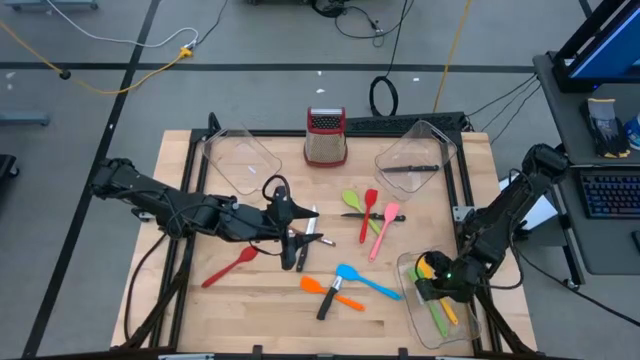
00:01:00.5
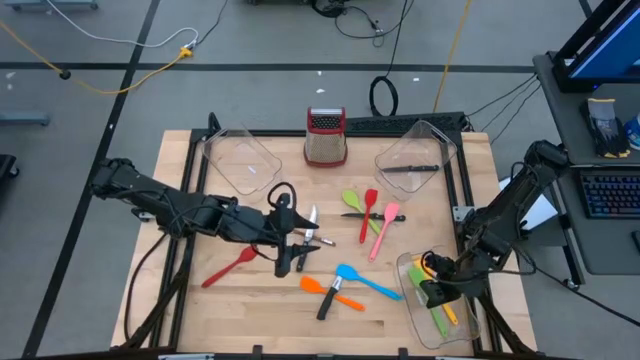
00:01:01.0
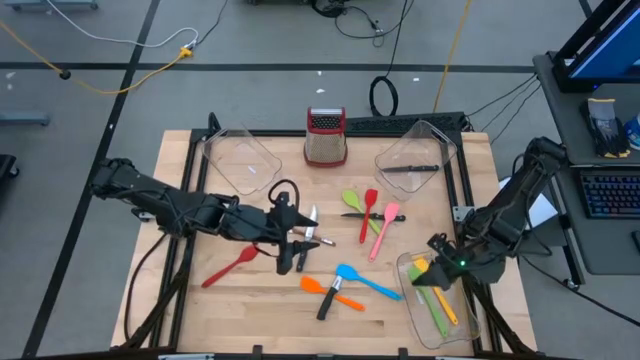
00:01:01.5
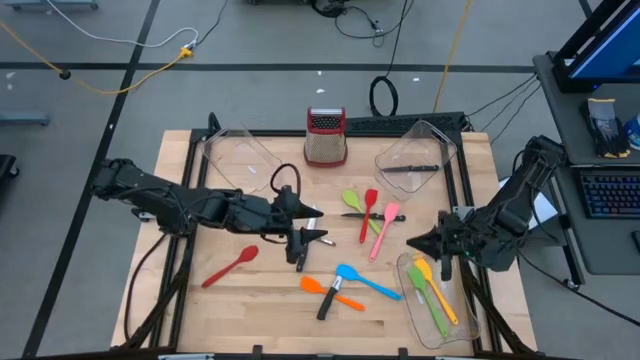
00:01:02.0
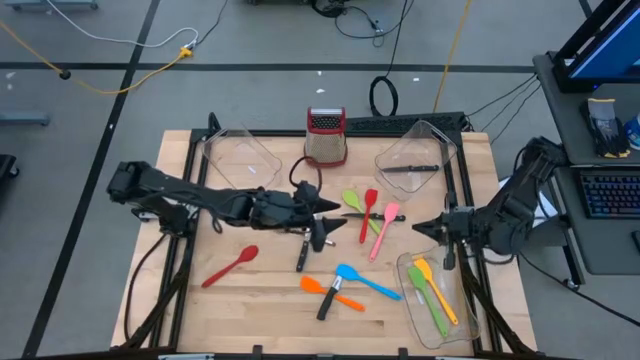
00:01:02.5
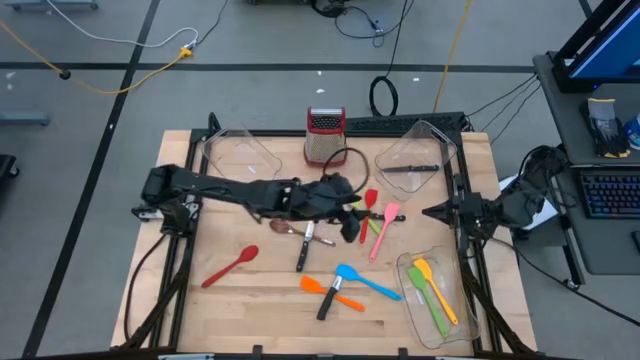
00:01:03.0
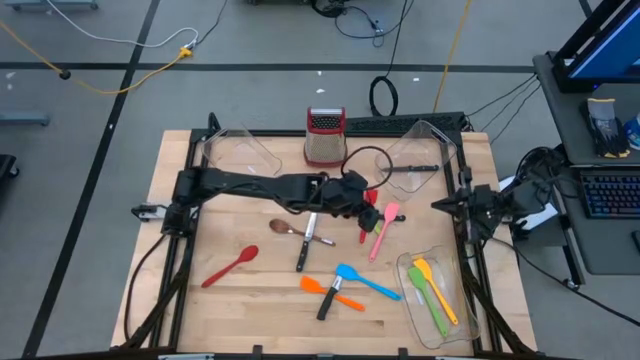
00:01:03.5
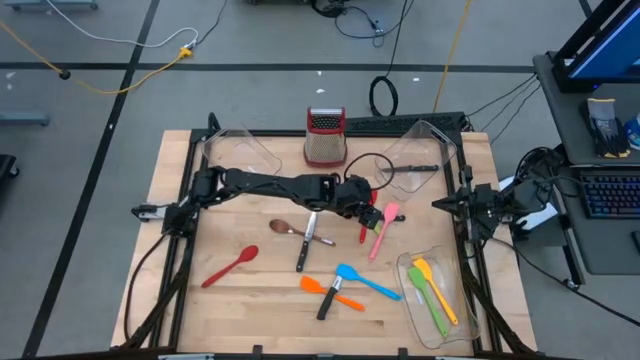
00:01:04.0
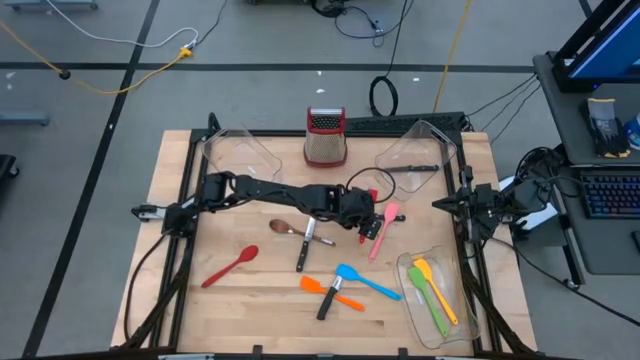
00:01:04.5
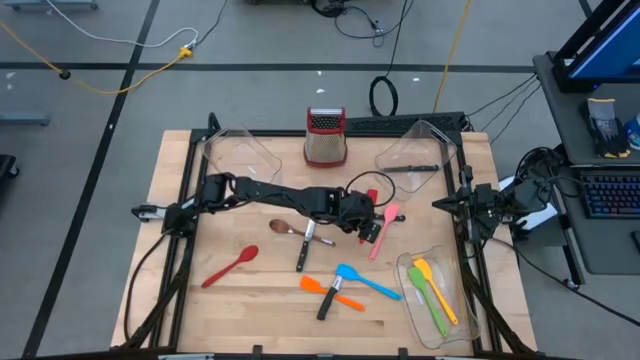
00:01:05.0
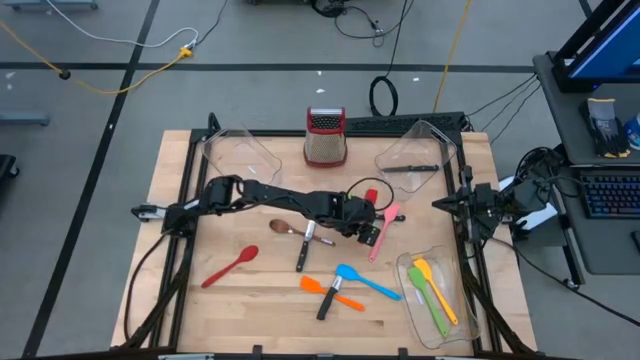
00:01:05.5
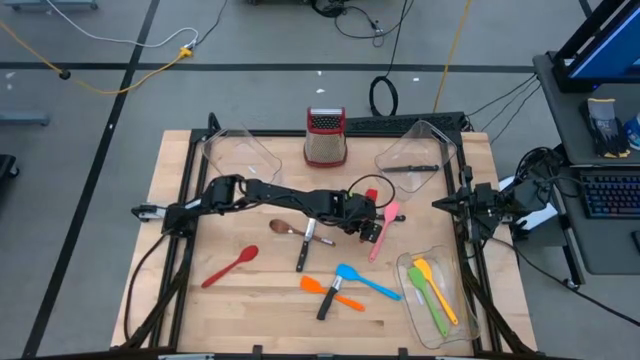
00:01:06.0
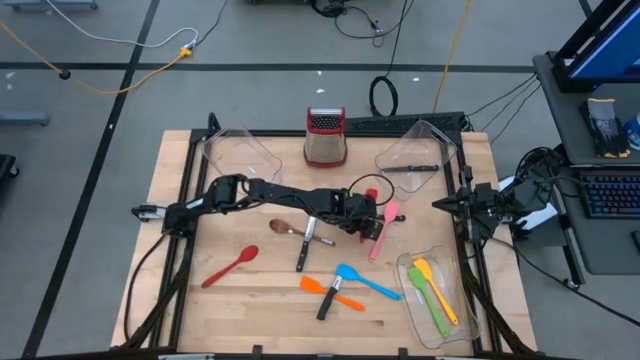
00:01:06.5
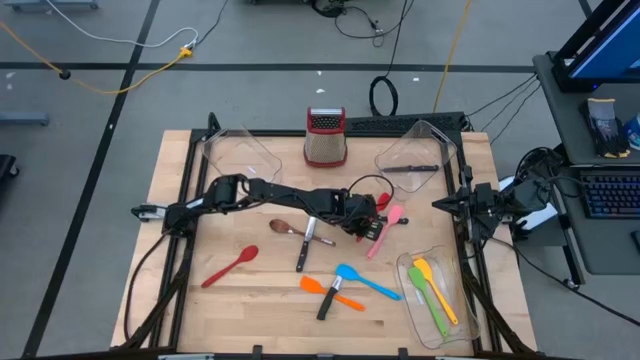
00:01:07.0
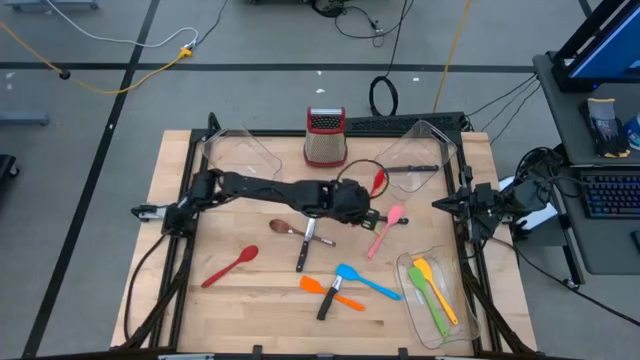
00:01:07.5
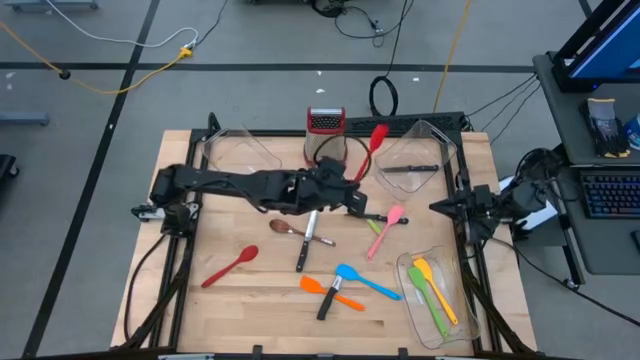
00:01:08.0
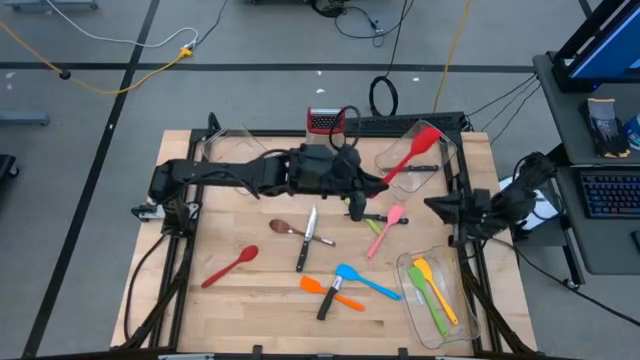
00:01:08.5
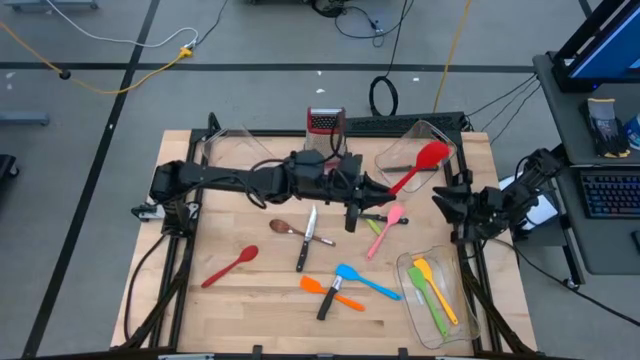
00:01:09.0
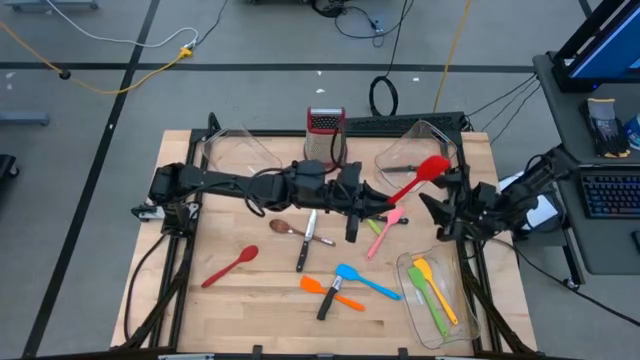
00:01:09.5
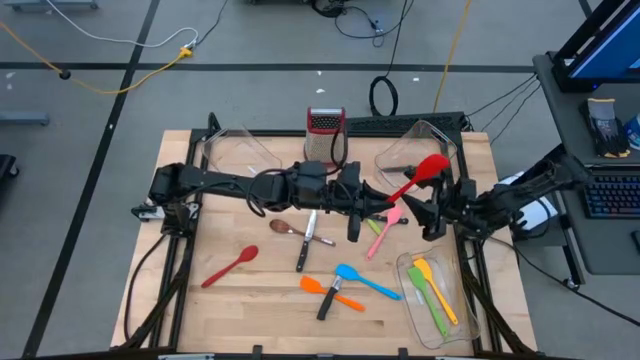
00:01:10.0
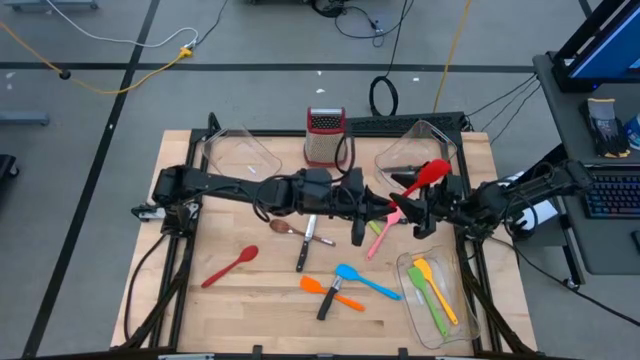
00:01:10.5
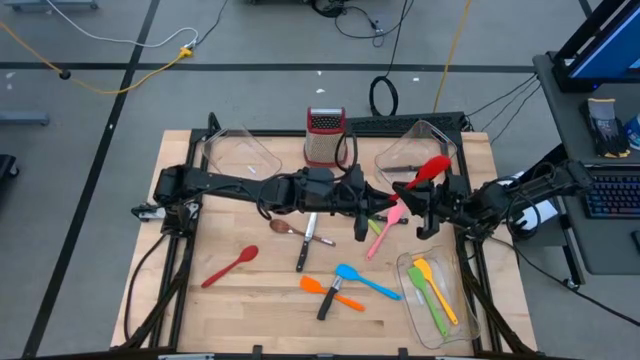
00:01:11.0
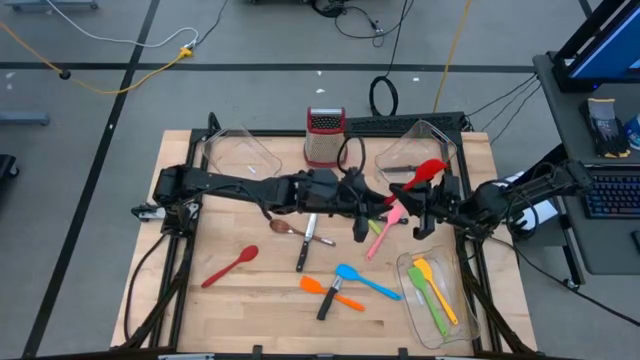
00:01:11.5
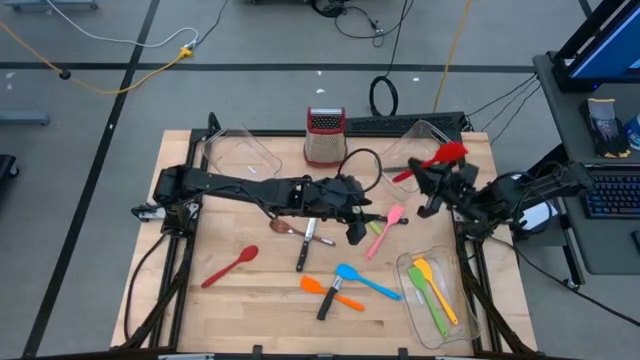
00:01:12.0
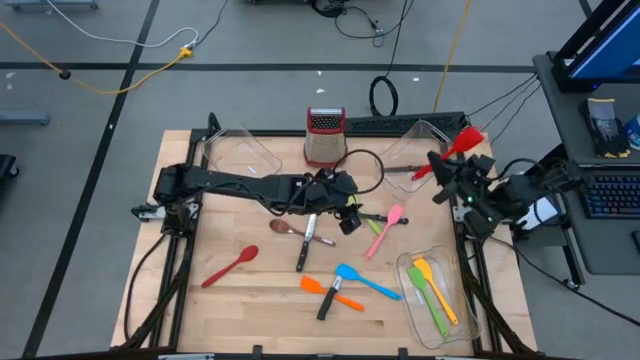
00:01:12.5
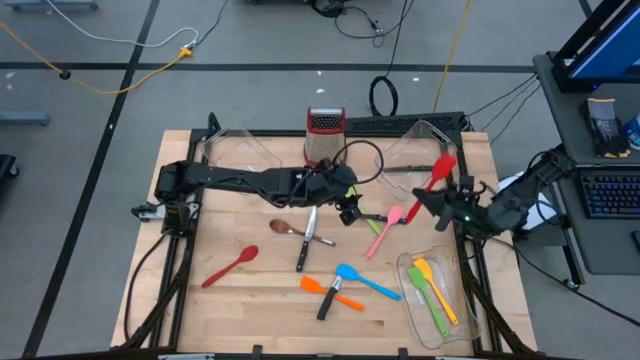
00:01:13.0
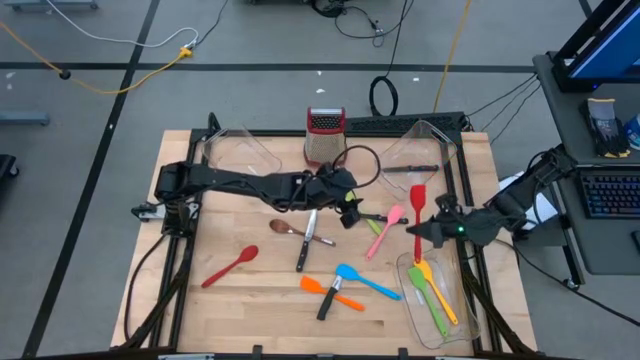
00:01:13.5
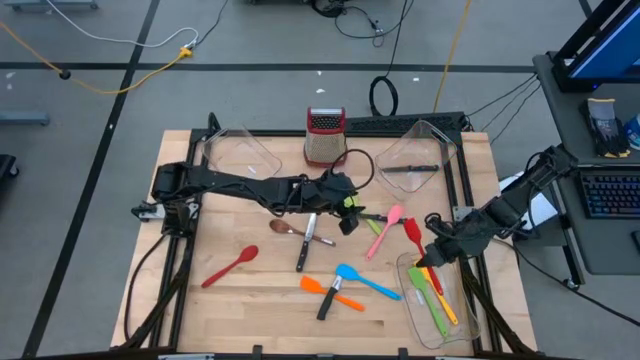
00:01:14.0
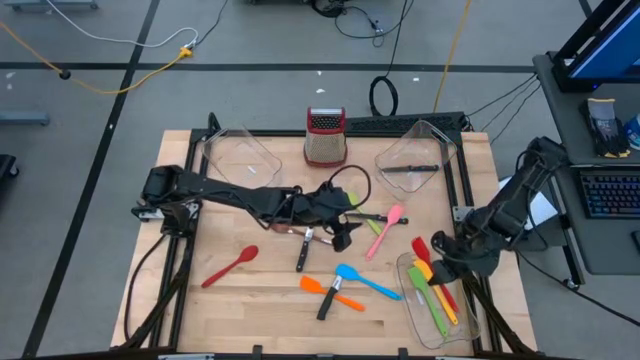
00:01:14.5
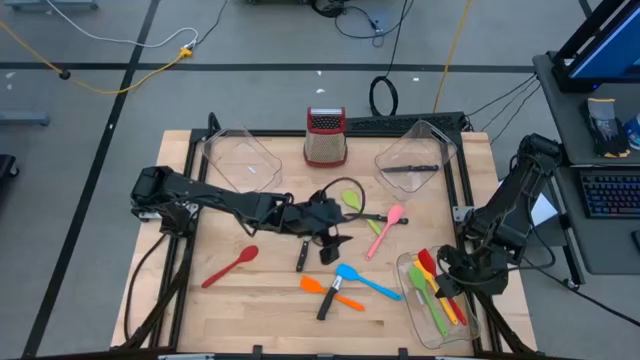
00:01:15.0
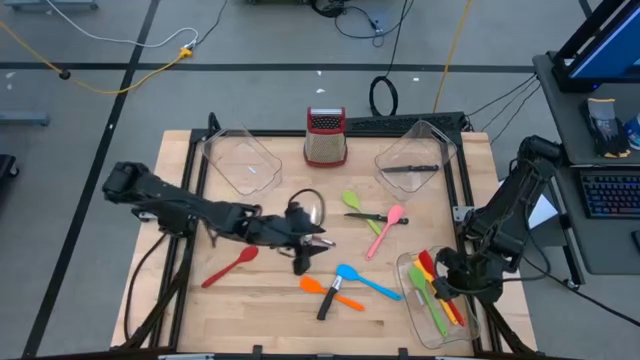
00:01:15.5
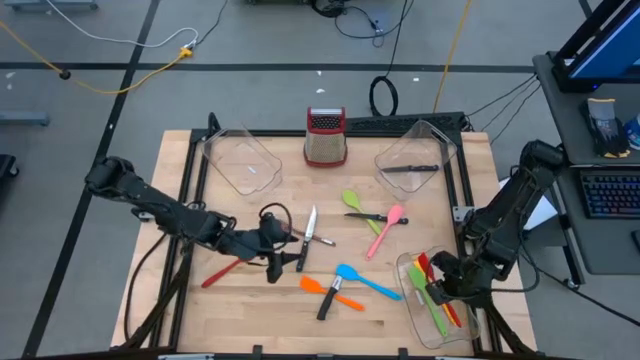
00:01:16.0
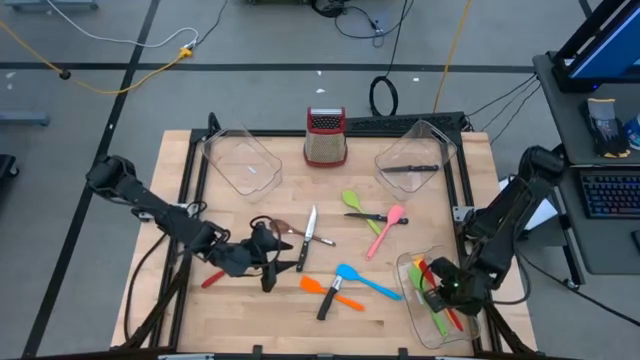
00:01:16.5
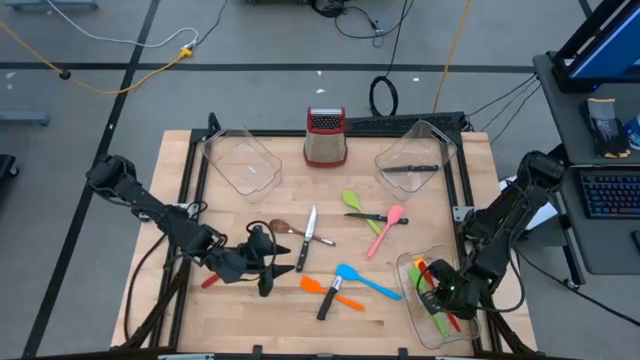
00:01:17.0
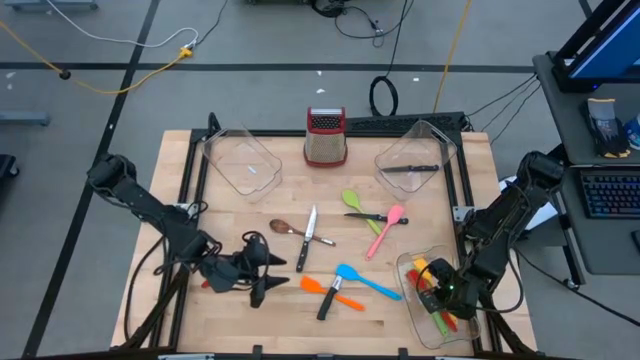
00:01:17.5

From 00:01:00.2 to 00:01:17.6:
Task: Pick & Place Kitchen Items
Put the red spatula into the bottom transparent bin

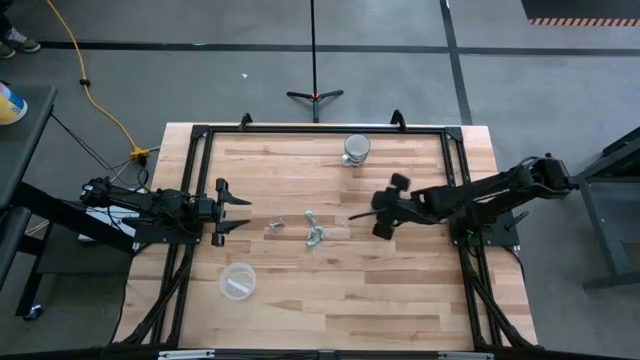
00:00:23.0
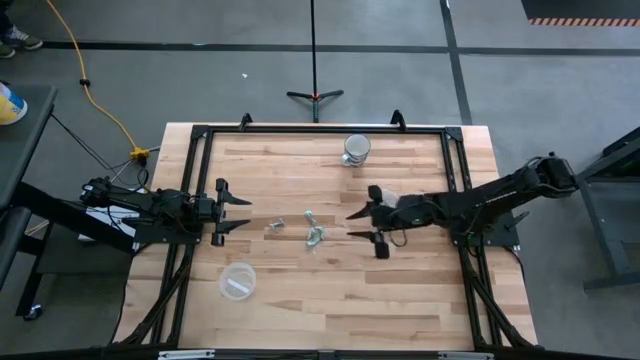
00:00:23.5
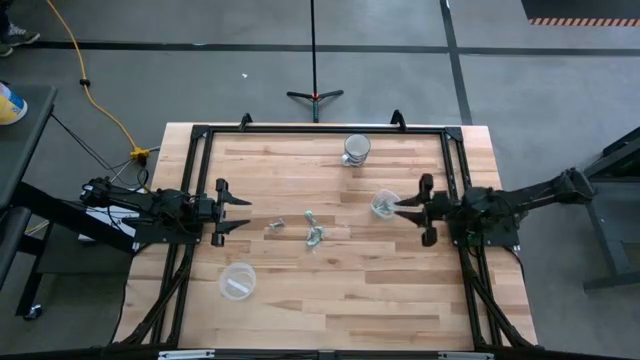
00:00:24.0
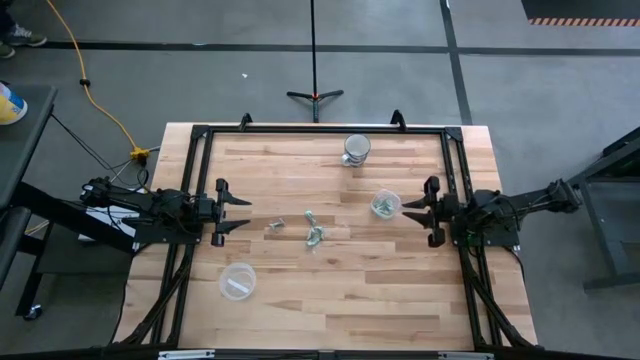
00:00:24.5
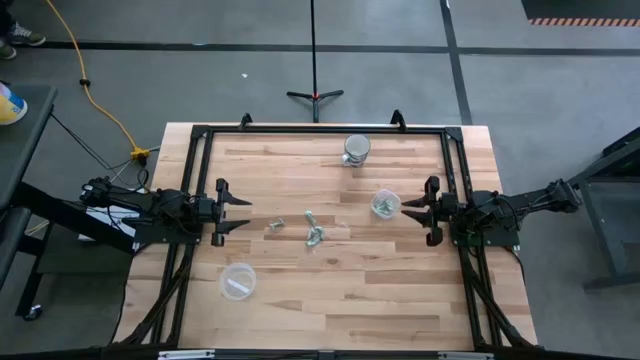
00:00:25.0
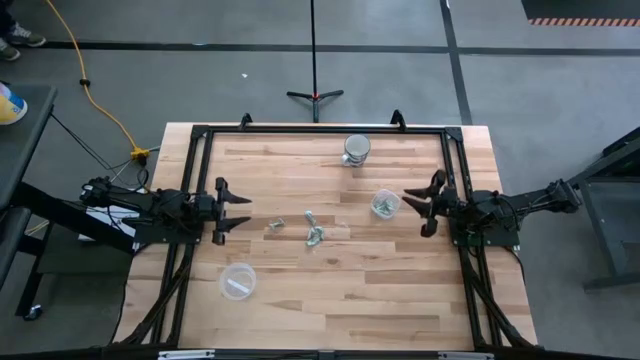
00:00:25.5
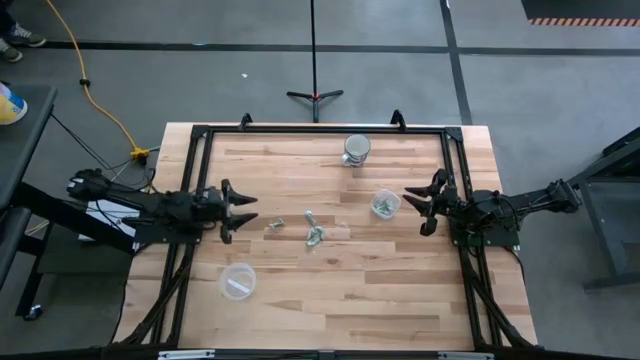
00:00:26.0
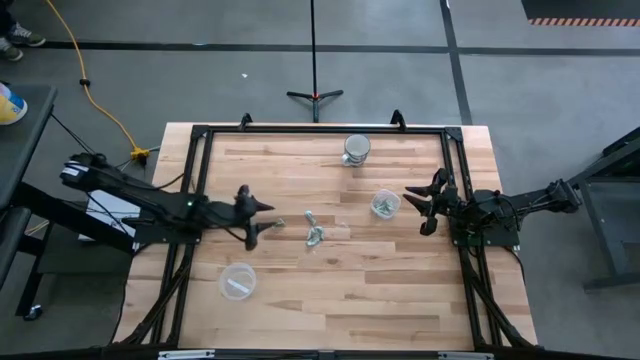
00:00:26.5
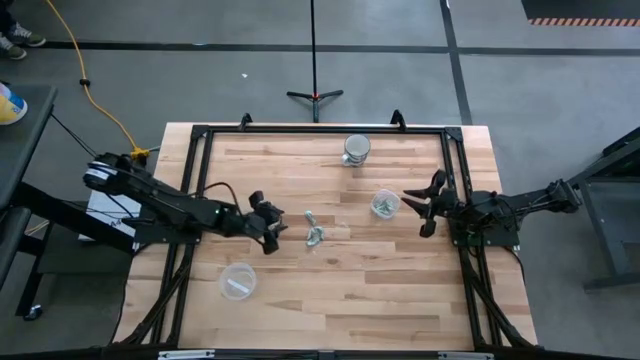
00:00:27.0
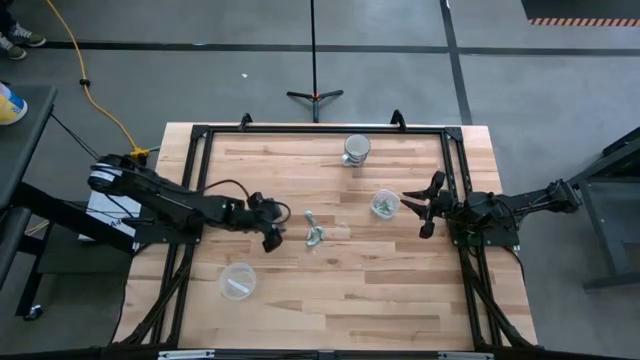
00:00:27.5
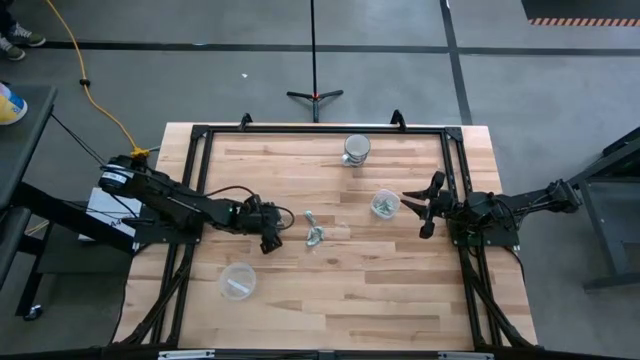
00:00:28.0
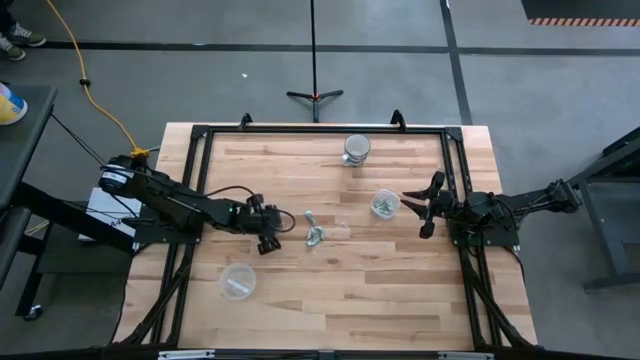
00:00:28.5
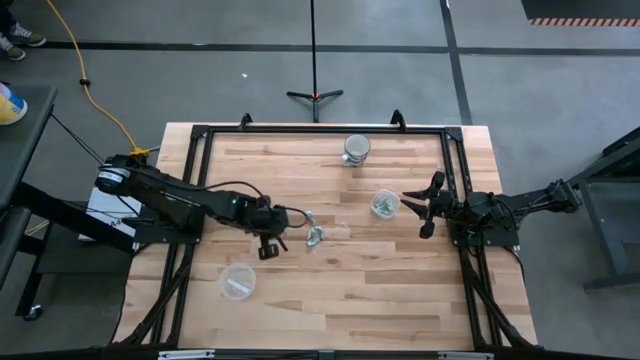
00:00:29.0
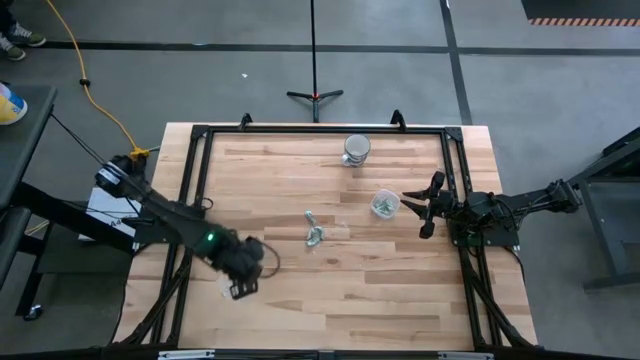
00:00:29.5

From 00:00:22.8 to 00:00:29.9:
Task: Pick and place Stevia / Truvia into bins
Put the stevia packet into the round transparent container
